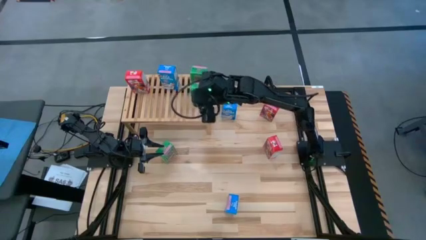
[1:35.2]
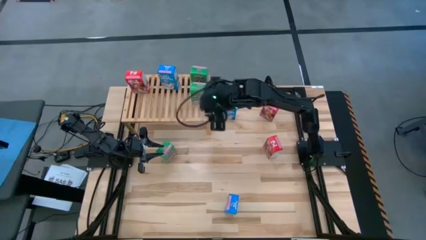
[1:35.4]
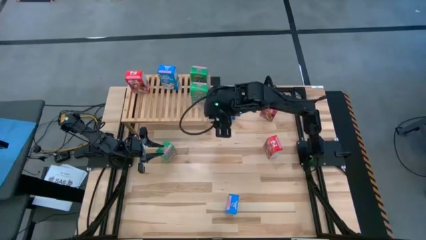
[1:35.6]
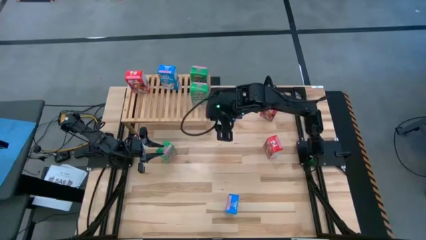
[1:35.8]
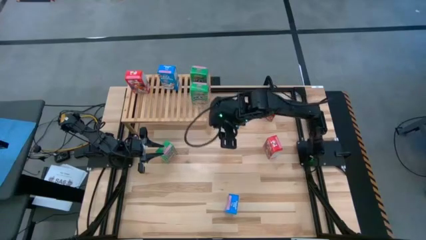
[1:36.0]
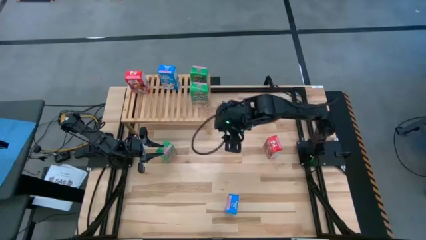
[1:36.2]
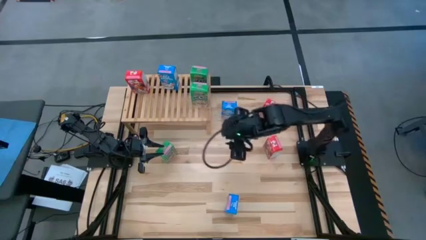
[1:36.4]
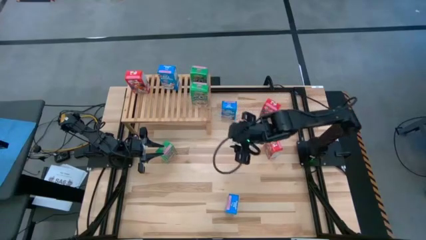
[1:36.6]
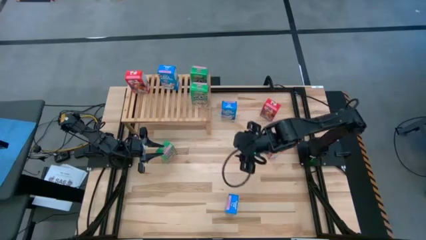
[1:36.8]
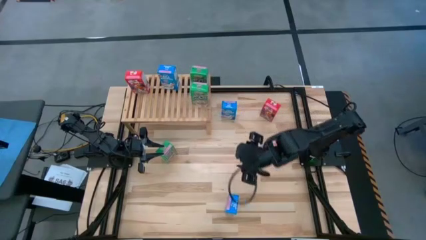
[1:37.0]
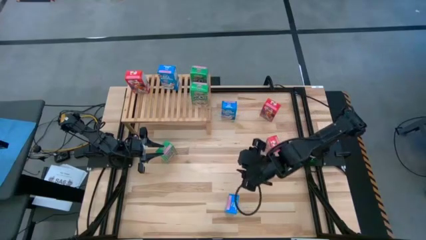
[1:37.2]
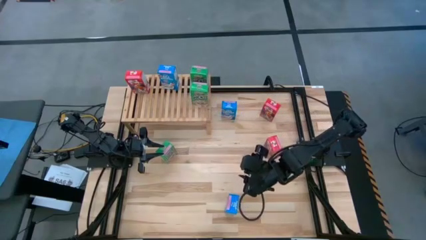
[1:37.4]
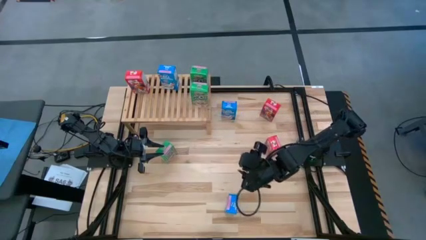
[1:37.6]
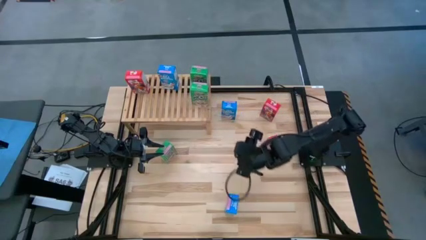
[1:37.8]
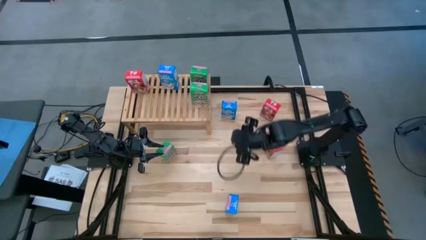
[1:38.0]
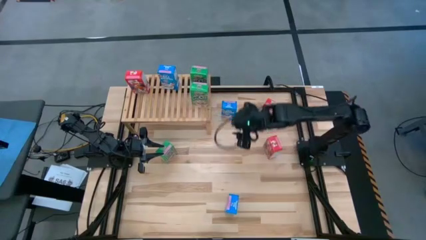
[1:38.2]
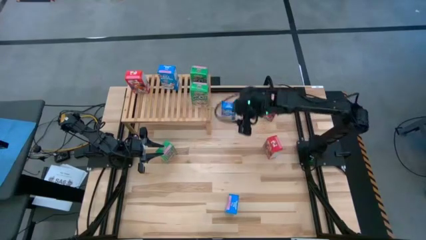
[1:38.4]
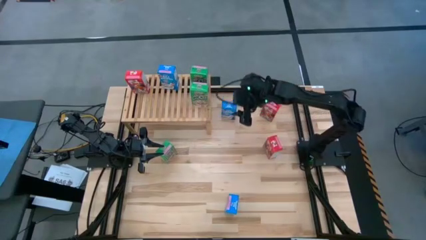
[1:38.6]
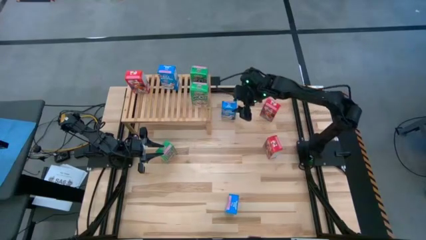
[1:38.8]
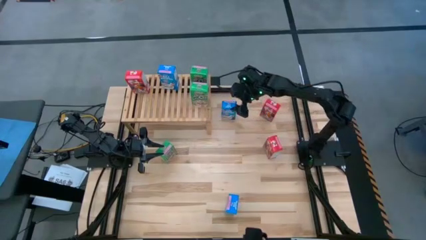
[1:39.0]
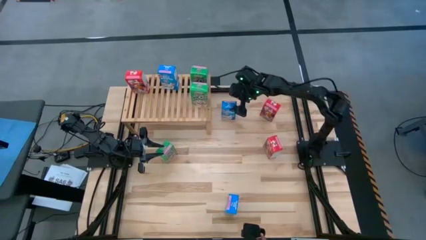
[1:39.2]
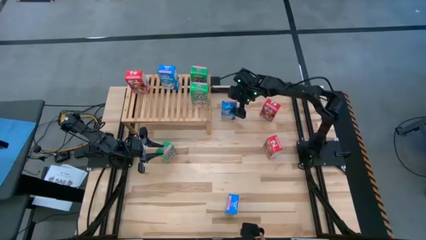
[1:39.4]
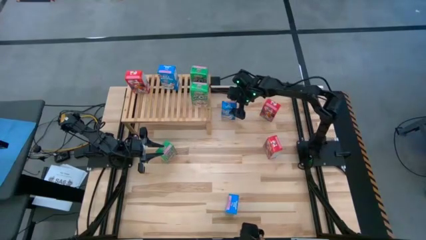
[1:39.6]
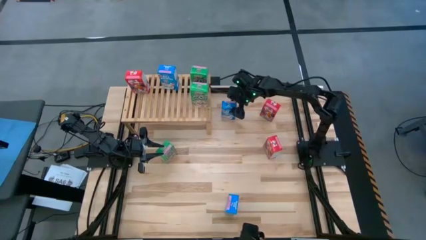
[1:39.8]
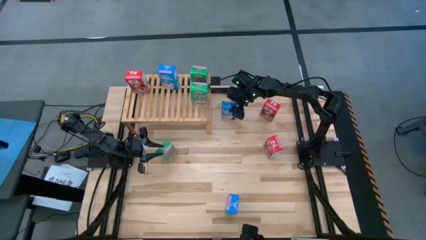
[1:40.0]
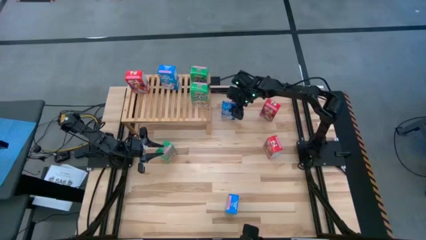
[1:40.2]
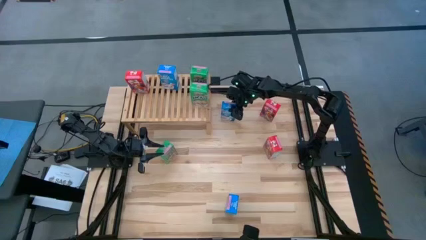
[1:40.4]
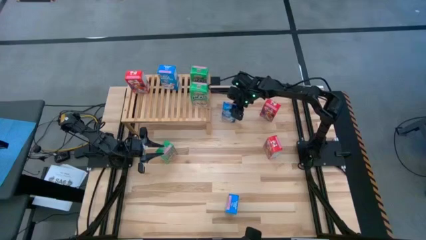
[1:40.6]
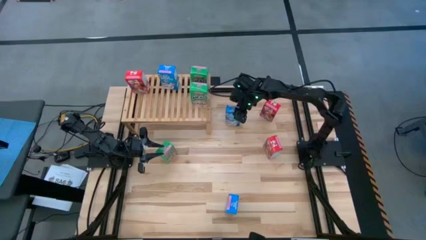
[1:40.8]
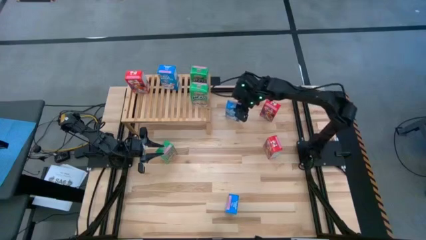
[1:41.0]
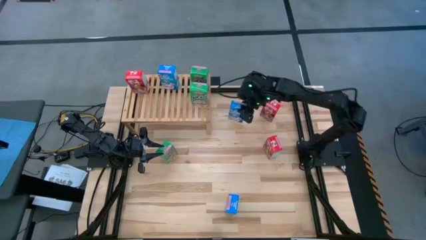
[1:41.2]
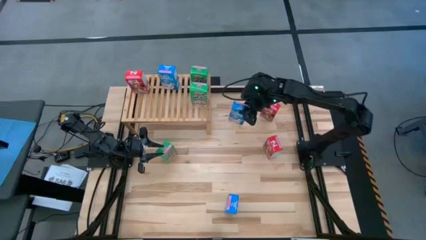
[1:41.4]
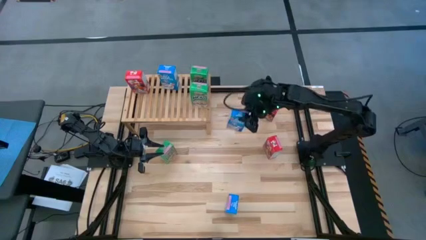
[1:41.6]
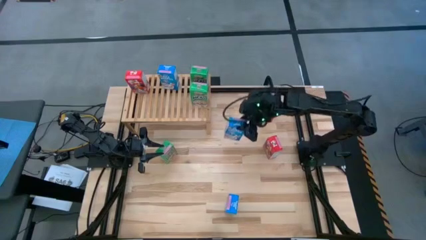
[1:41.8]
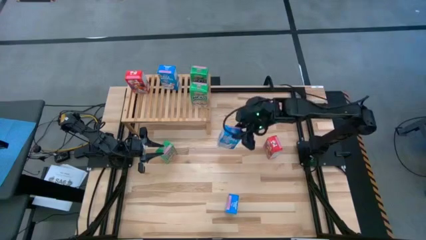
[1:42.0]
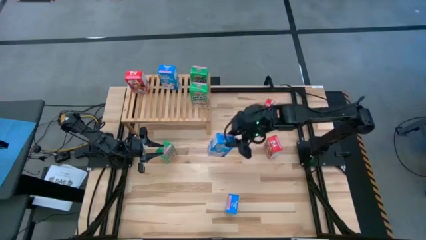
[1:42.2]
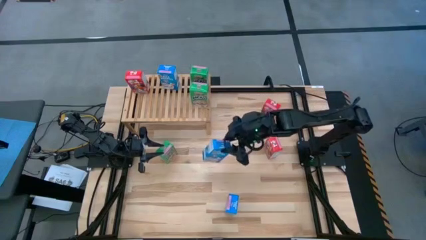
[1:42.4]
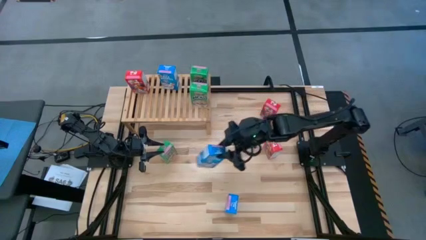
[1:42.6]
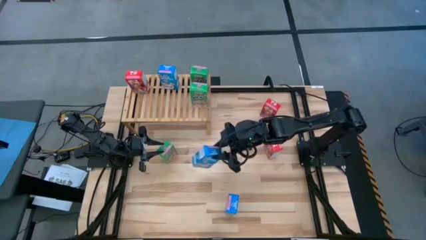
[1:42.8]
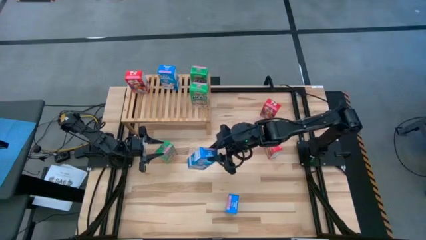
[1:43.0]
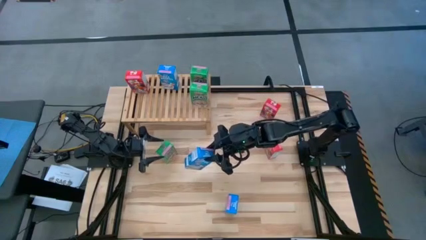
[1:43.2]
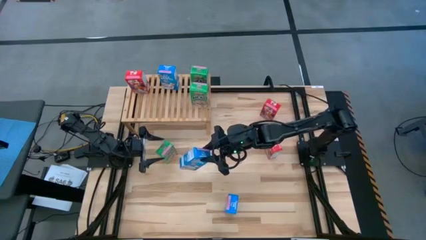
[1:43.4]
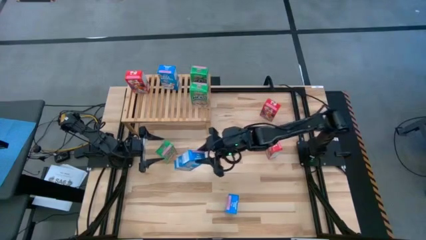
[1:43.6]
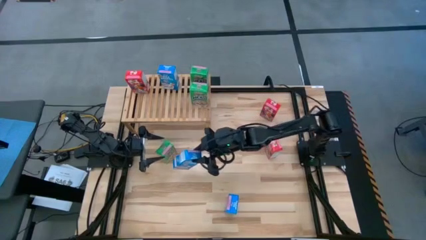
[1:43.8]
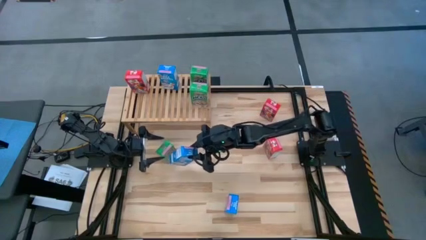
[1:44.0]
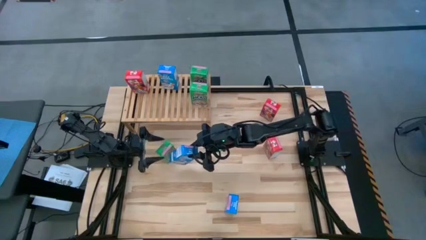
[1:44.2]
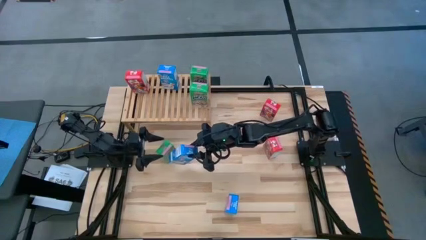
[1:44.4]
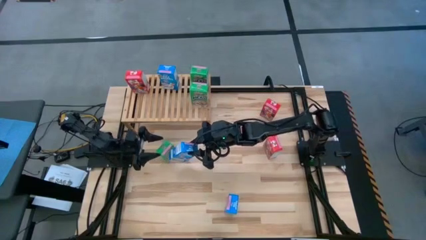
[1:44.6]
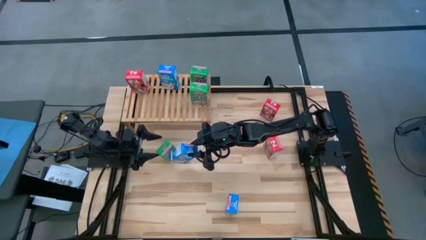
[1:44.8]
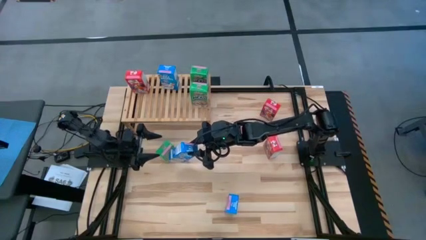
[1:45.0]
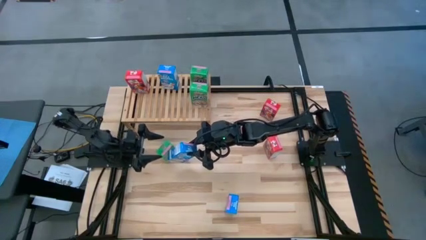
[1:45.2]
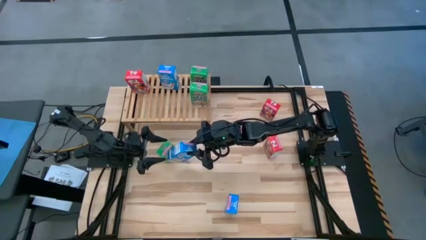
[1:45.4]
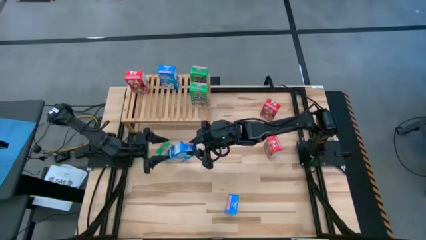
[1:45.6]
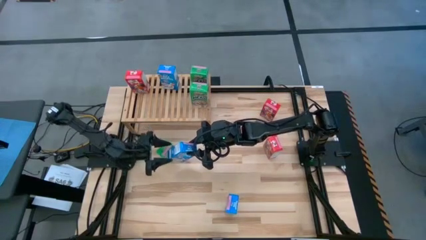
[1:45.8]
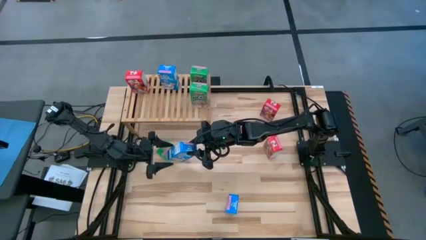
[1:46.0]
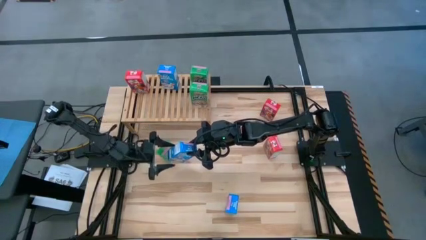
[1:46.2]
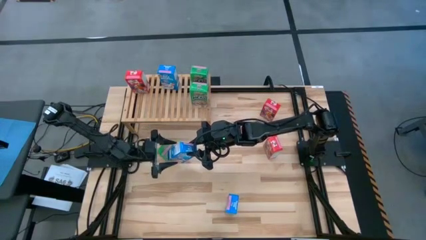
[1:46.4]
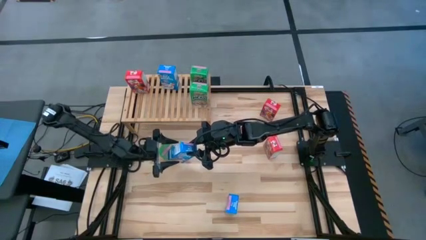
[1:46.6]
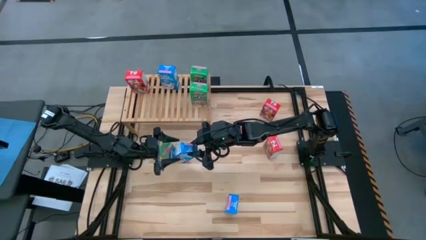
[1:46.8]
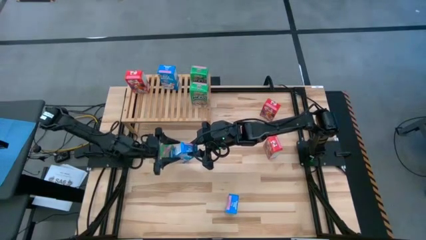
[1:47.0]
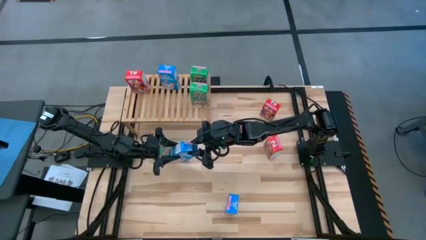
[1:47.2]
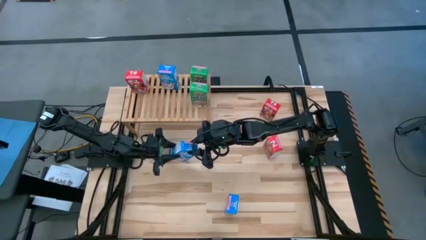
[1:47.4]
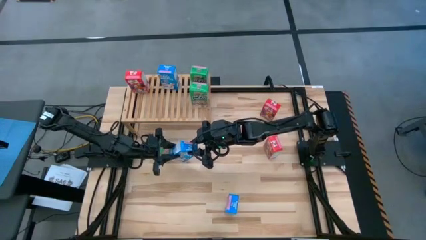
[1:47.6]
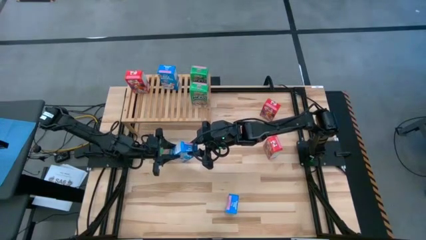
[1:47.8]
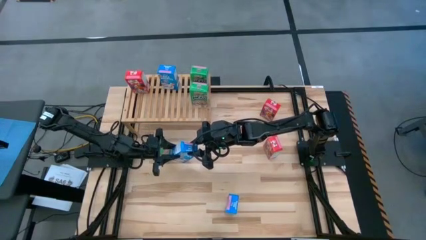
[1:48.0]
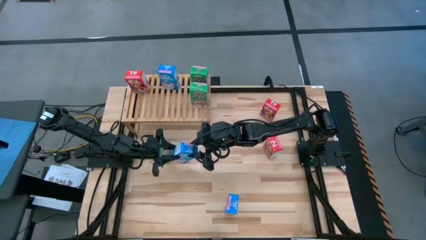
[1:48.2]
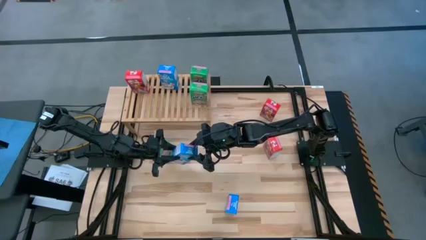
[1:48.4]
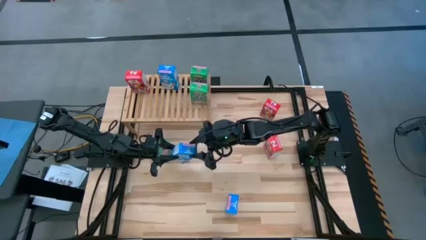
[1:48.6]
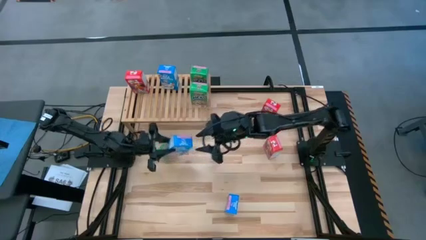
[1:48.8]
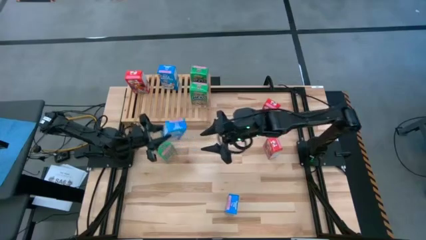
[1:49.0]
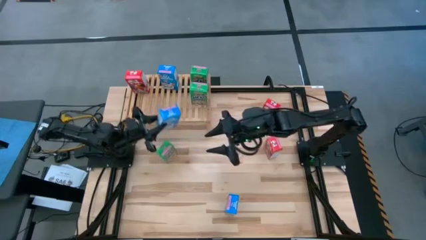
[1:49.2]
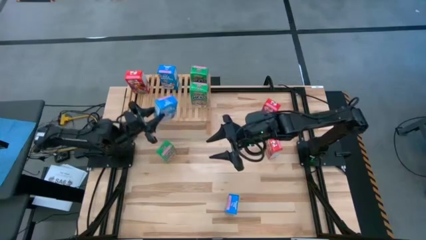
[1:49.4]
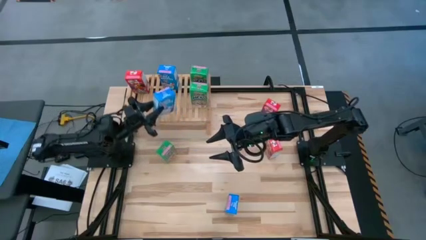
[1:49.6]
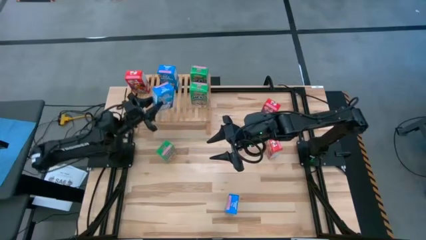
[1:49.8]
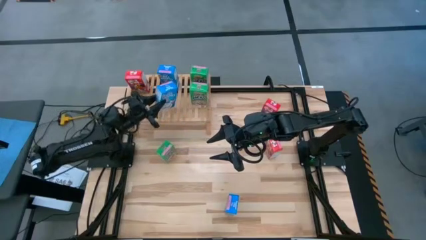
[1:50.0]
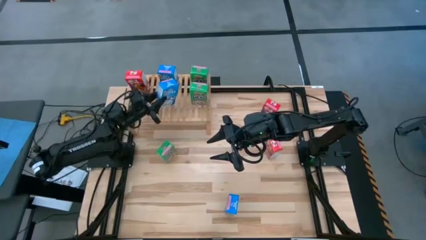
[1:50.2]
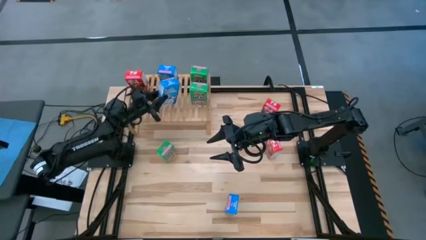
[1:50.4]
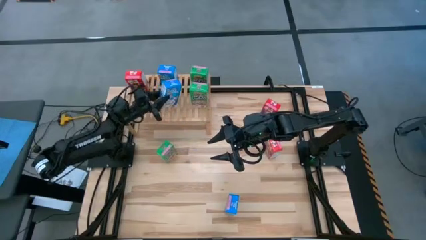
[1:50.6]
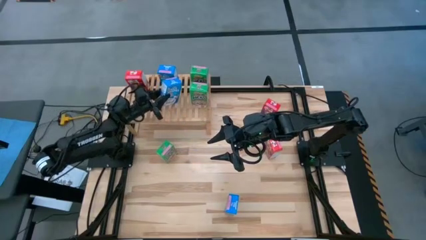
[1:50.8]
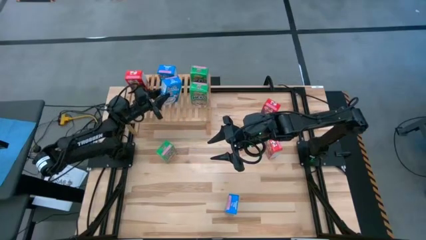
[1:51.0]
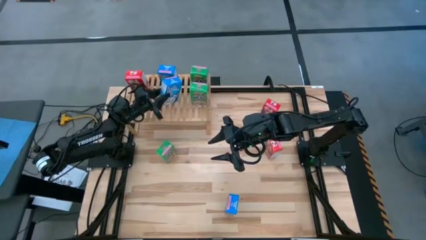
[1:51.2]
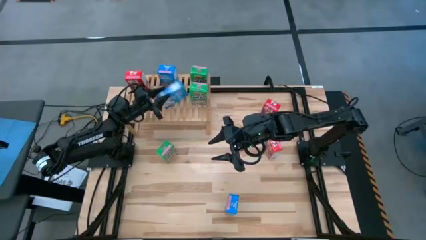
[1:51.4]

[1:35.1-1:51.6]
Task: Stack cereal on shelf
Put the top blue cereal box on the shelf aligned with the blue cereal box

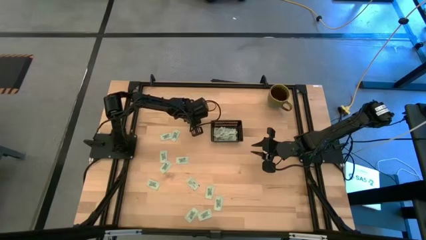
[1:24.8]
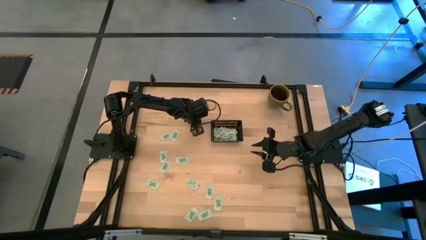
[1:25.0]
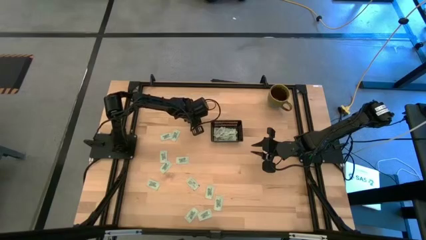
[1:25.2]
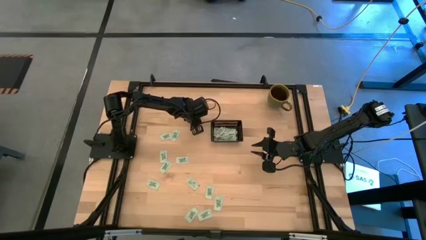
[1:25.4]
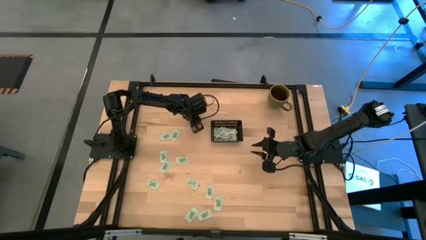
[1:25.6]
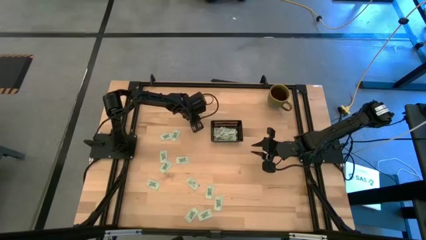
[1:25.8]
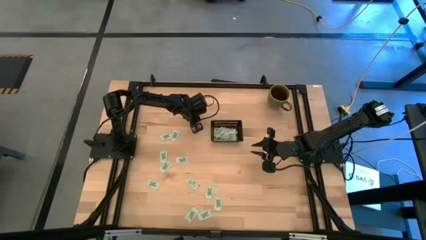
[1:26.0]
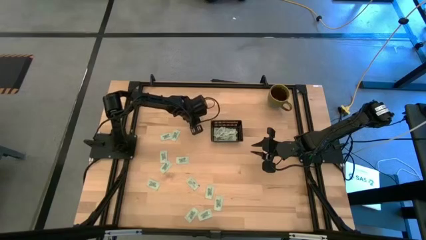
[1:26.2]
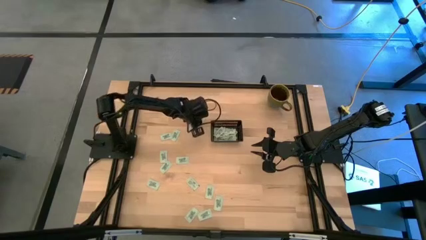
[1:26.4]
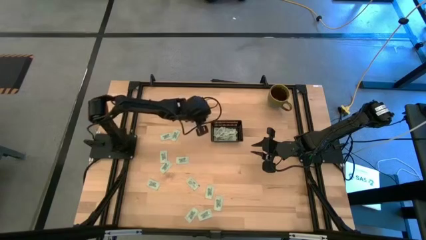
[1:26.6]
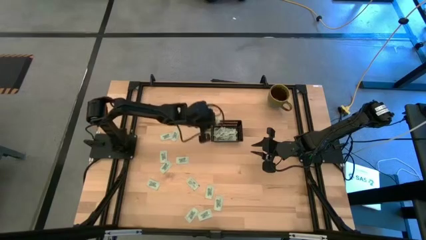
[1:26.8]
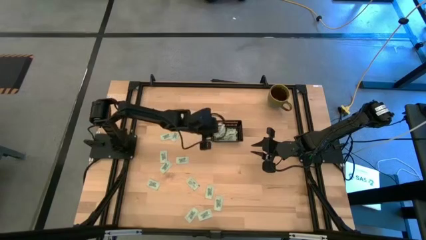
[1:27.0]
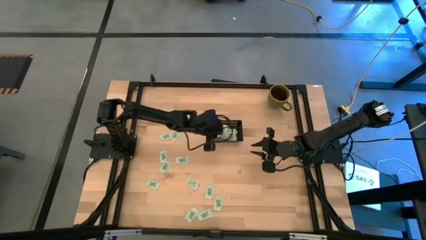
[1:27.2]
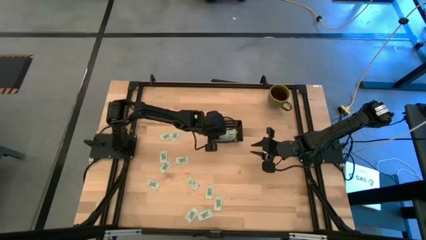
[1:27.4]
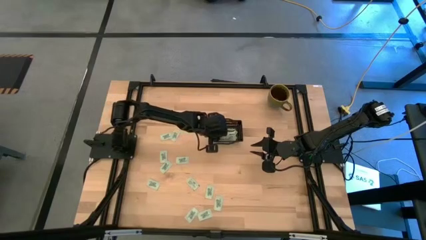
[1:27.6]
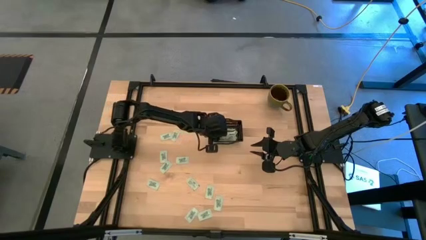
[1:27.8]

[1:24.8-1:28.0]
Task: Pick and place Stevia / Truvia into bins
Put the stevia packet into the black basket
